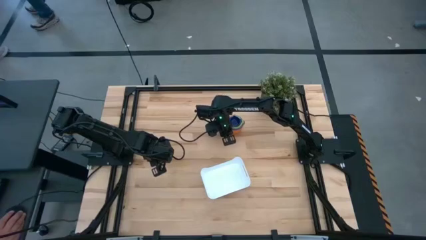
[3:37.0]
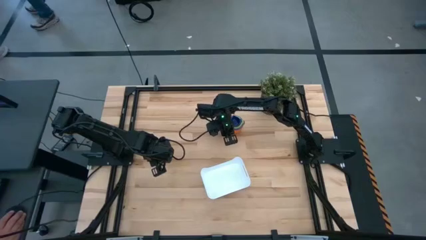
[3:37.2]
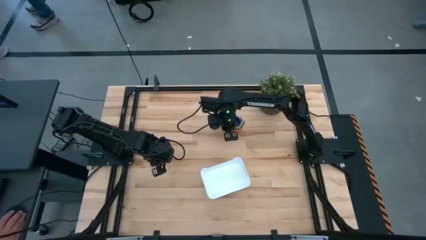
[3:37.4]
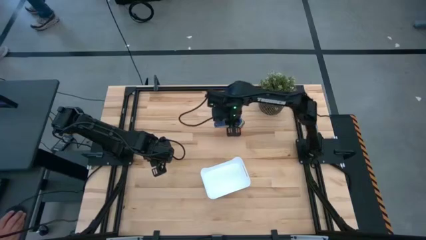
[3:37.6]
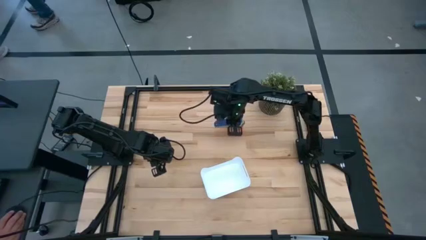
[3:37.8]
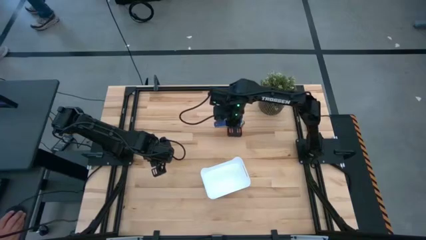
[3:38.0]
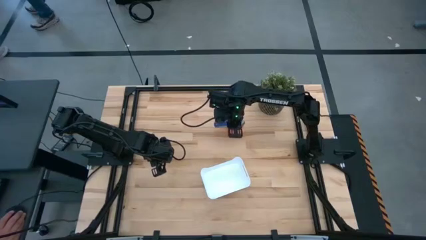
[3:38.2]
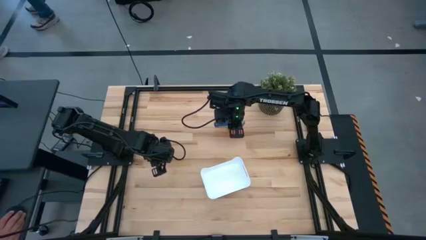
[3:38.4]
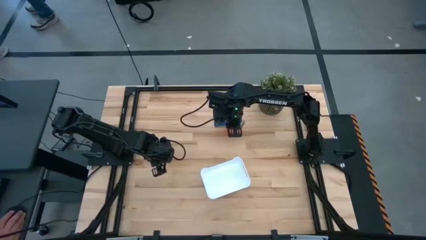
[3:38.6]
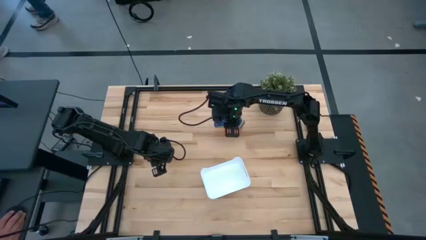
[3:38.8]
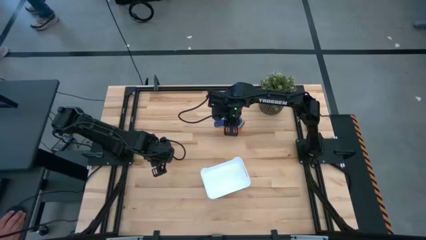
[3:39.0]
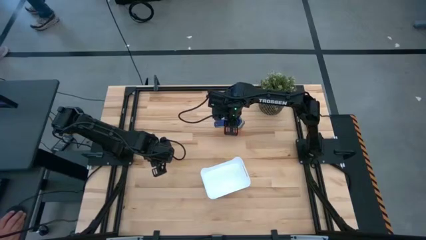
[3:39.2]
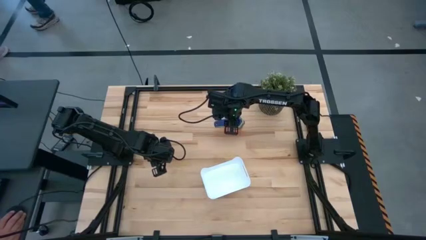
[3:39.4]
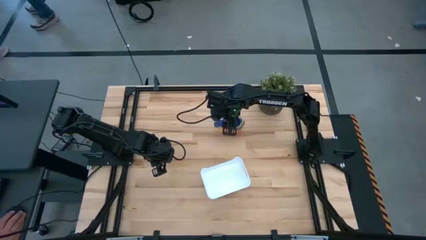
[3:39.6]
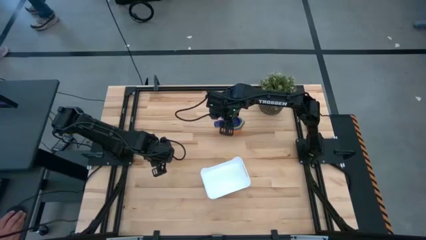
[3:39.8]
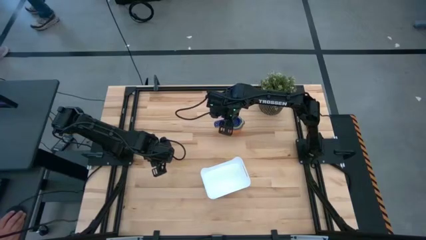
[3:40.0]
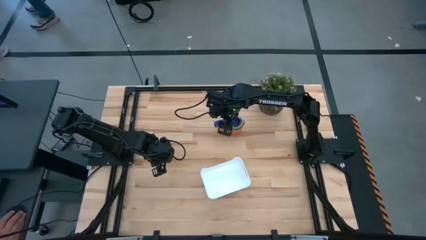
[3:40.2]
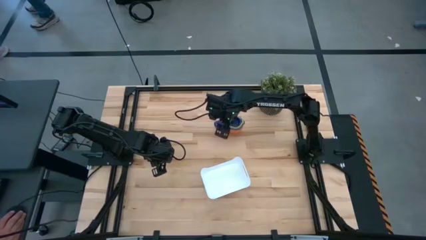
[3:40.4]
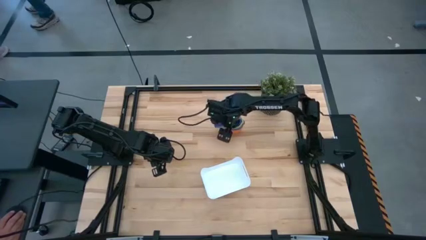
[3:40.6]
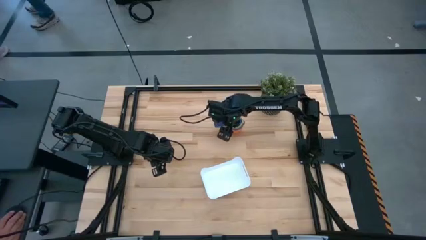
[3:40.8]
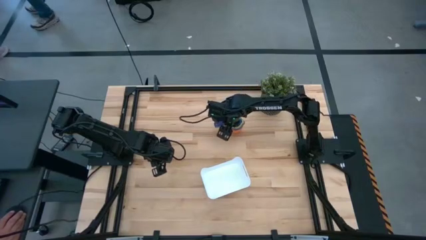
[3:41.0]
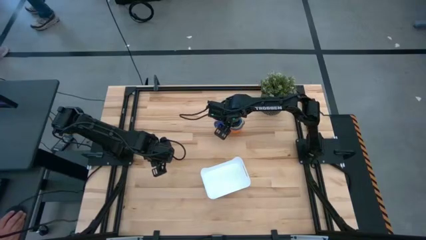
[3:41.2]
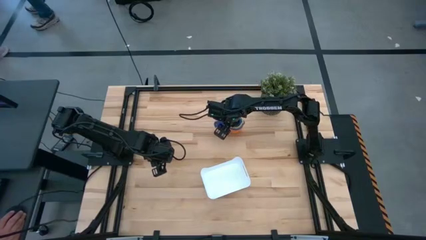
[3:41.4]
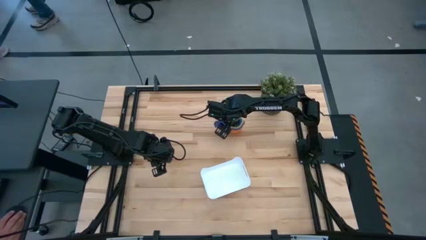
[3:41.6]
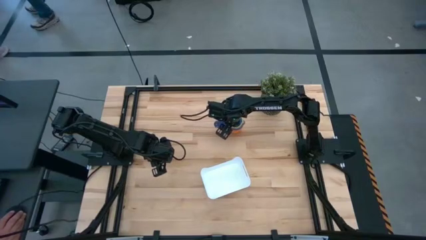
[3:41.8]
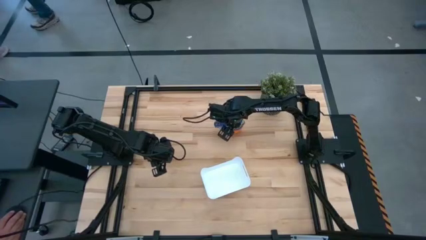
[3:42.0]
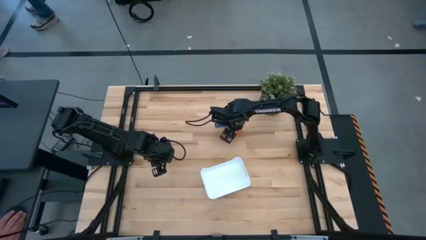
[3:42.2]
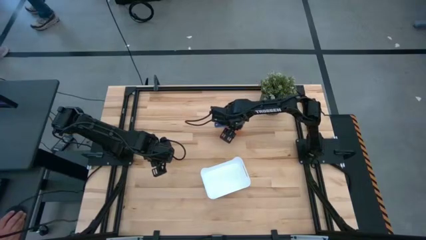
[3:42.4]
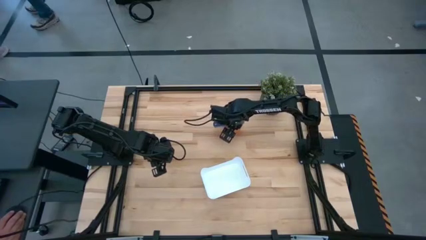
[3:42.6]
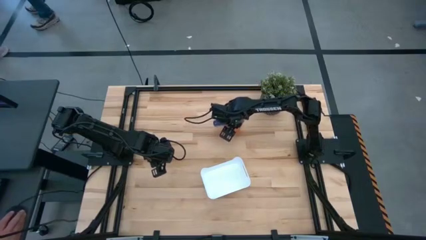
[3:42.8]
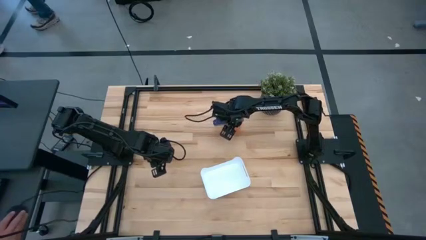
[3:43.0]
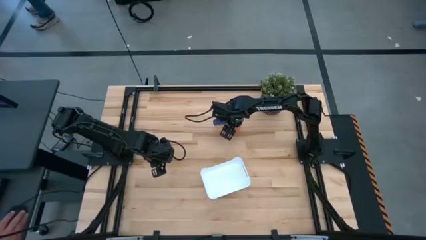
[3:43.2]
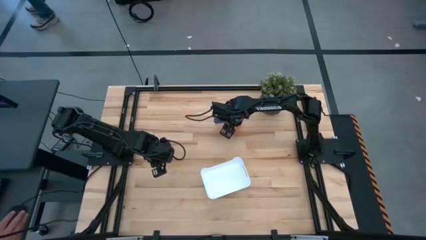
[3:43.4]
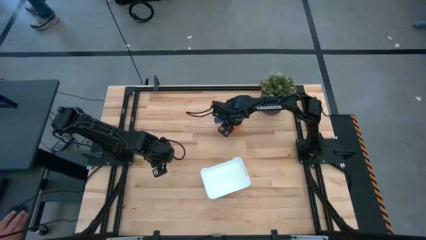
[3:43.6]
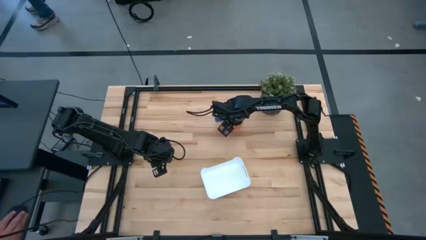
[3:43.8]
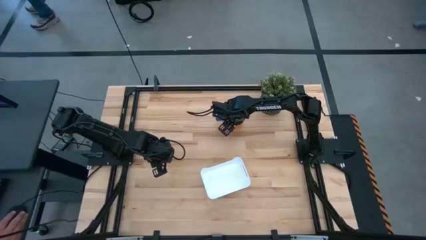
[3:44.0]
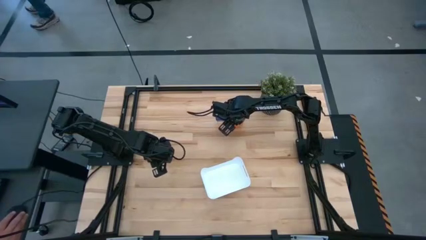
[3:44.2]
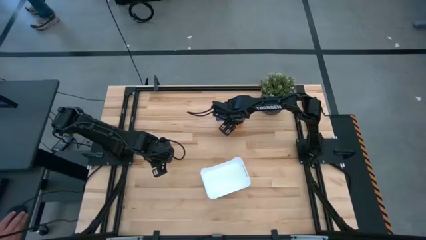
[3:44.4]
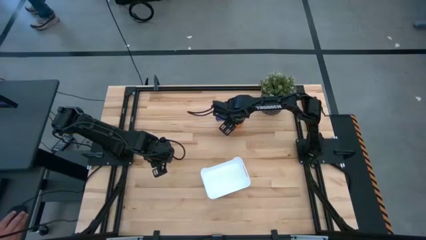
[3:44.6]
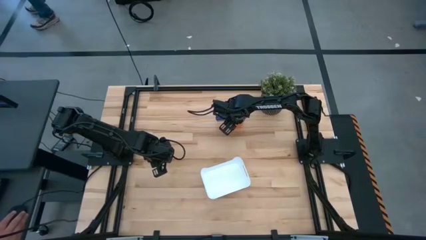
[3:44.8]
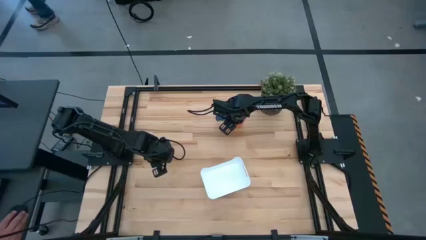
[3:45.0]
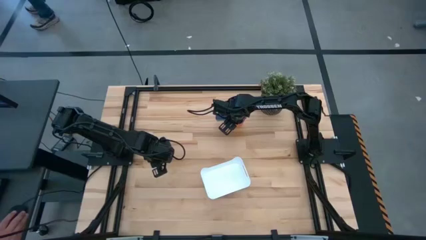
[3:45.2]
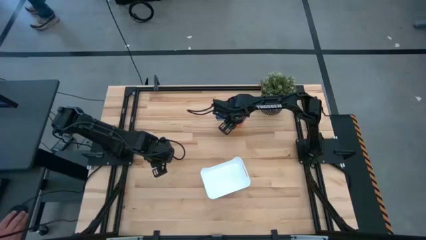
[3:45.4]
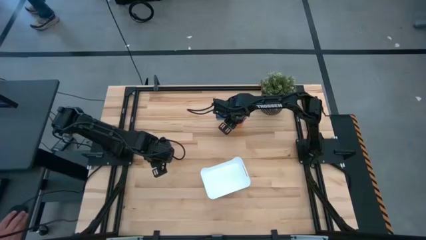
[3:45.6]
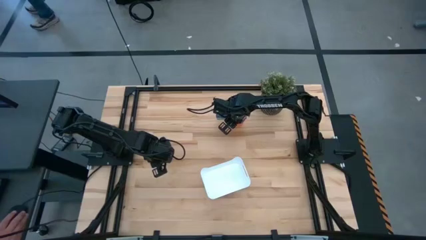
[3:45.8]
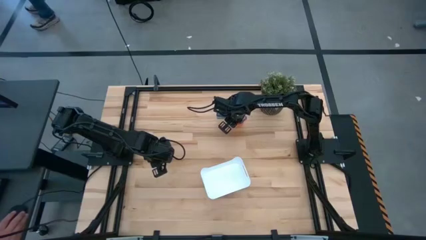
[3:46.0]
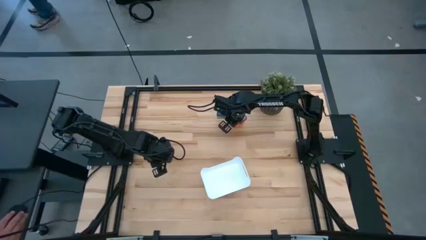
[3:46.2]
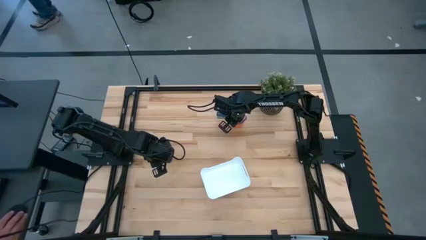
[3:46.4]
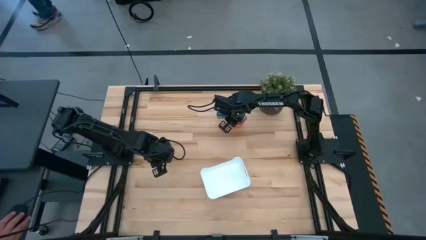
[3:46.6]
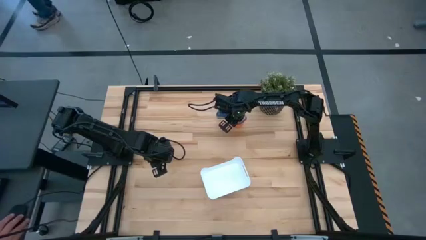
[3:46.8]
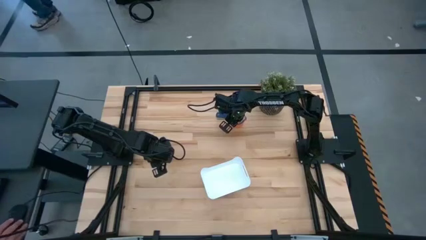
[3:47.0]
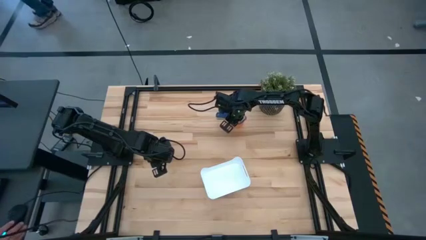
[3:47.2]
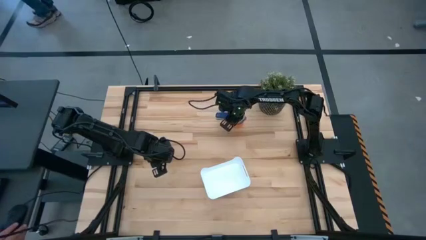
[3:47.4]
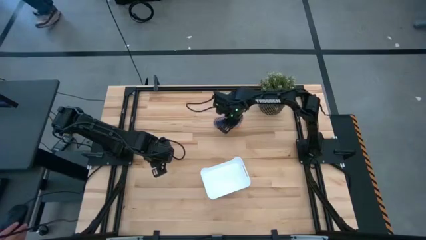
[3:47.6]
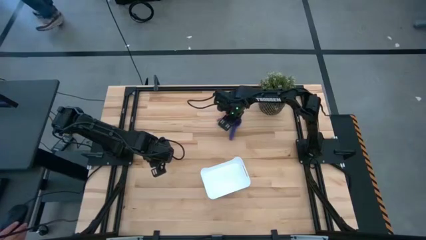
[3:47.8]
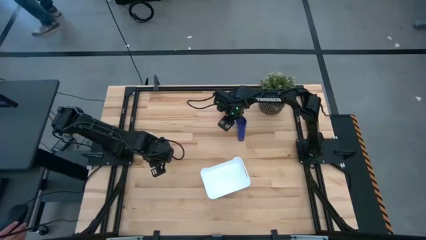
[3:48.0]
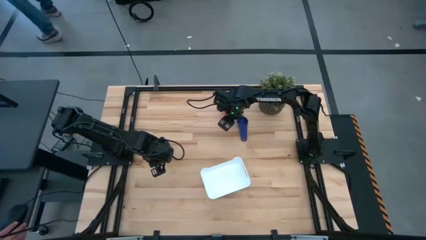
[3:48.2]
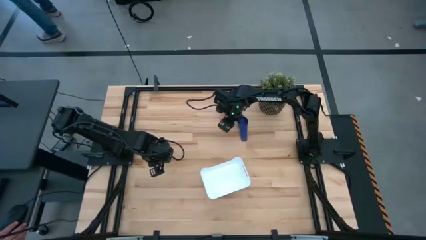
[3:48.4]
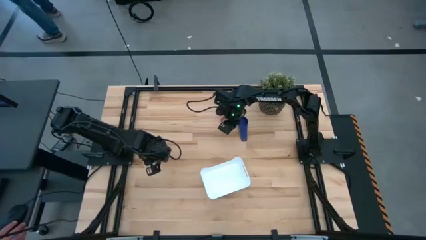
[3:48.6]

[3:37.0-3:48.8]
Task: Nest measuring cups in basket
Put the nested measuring cups into the white bin

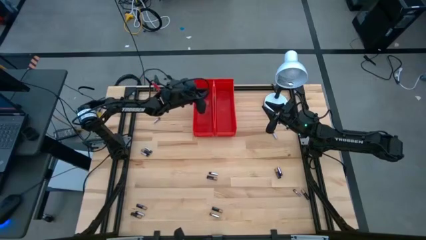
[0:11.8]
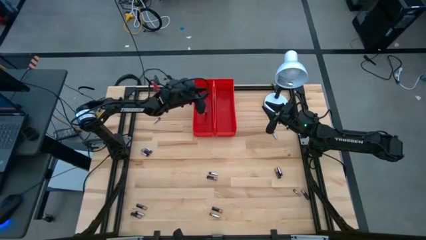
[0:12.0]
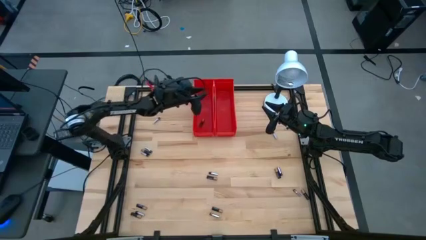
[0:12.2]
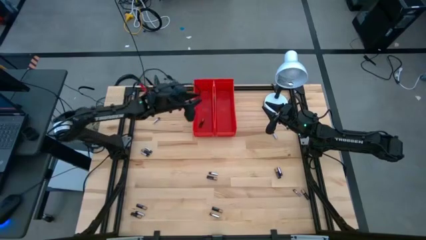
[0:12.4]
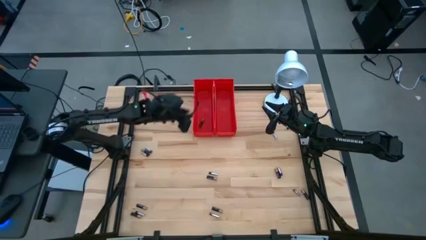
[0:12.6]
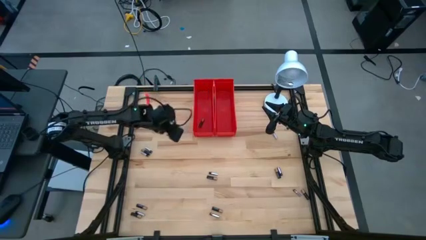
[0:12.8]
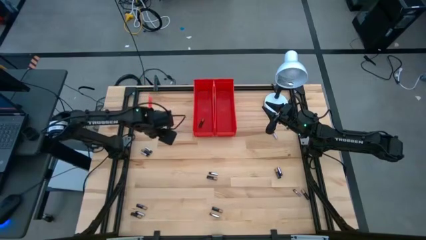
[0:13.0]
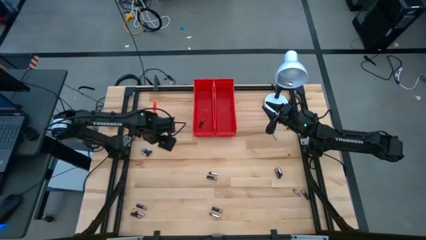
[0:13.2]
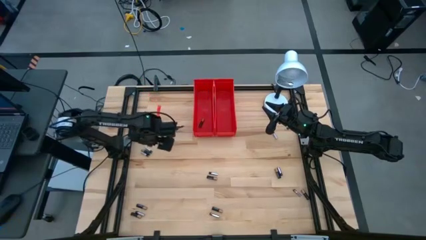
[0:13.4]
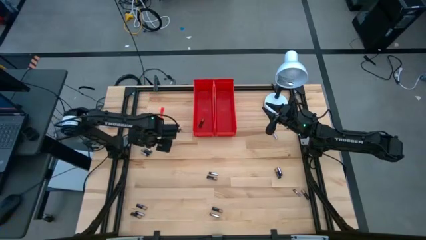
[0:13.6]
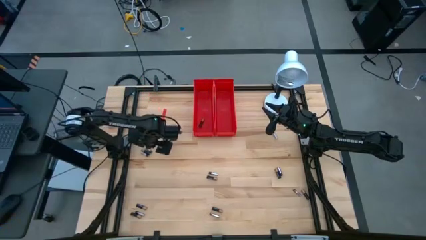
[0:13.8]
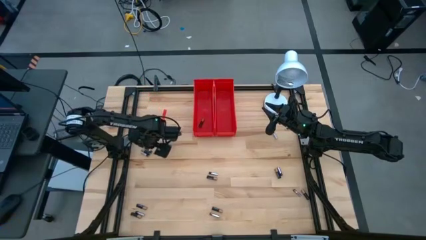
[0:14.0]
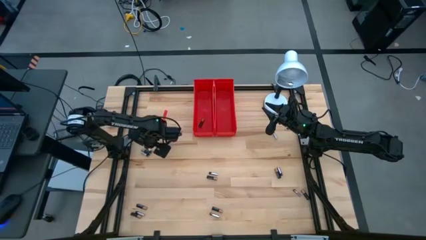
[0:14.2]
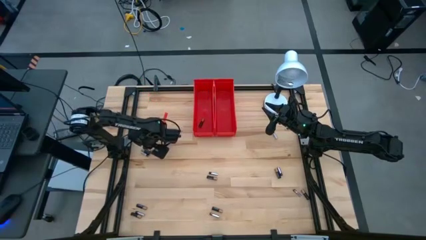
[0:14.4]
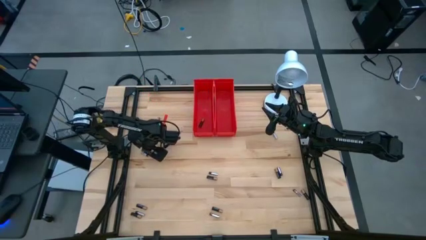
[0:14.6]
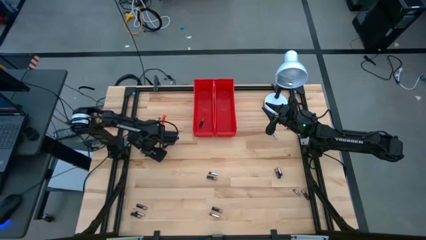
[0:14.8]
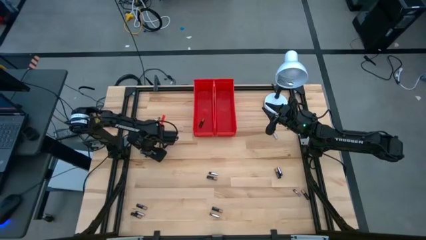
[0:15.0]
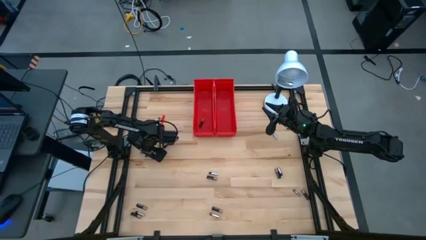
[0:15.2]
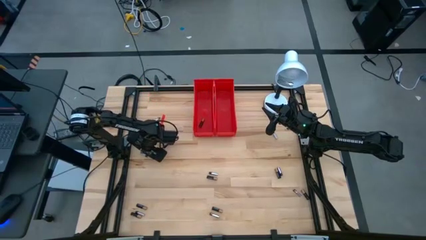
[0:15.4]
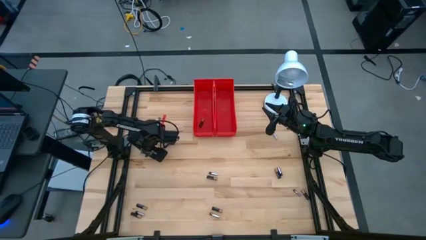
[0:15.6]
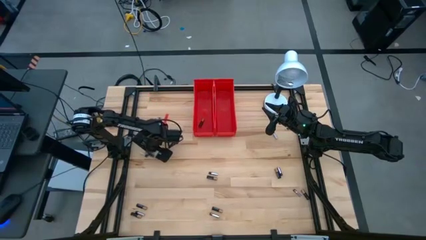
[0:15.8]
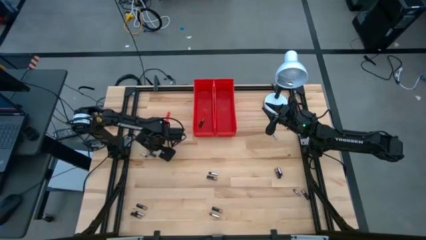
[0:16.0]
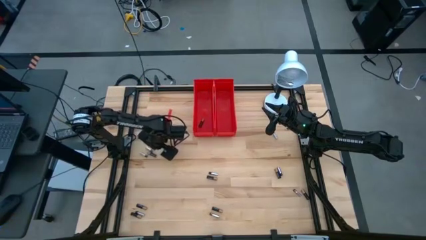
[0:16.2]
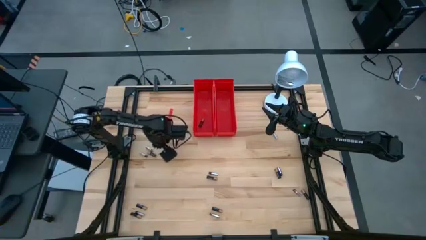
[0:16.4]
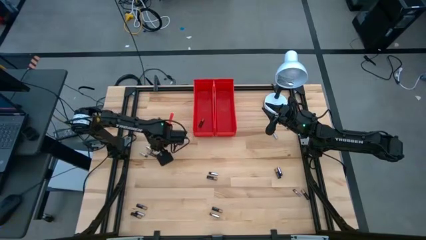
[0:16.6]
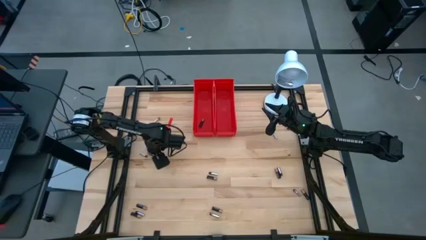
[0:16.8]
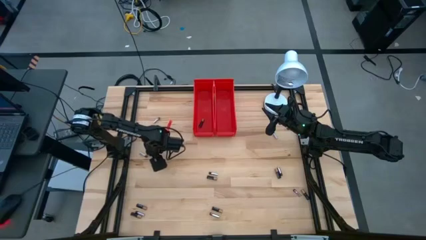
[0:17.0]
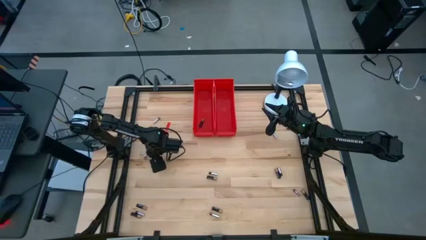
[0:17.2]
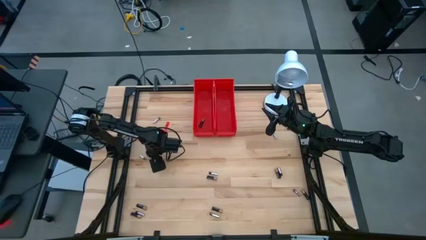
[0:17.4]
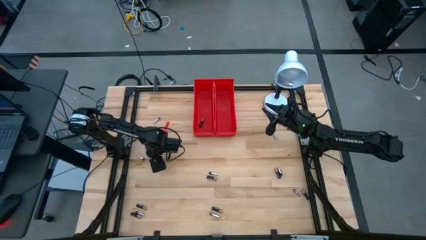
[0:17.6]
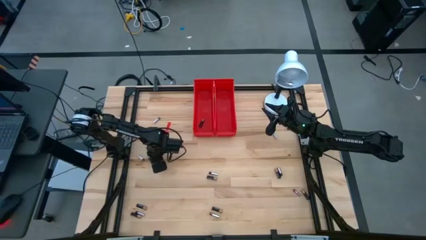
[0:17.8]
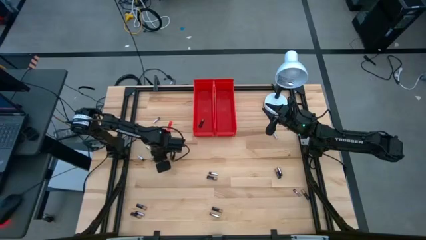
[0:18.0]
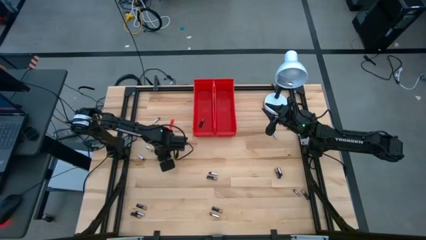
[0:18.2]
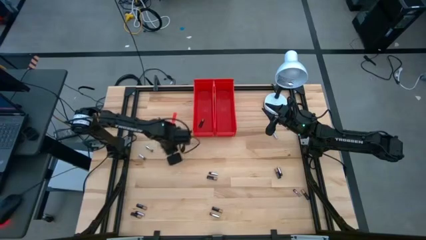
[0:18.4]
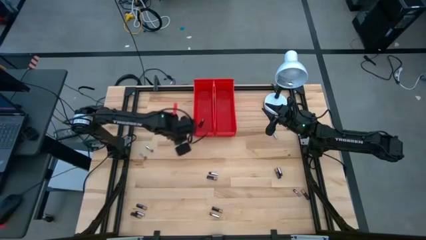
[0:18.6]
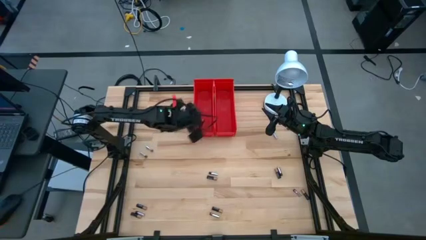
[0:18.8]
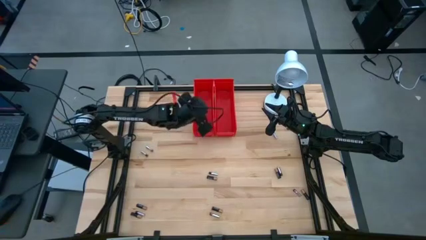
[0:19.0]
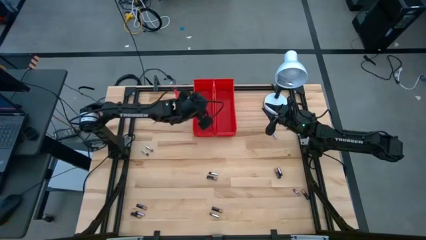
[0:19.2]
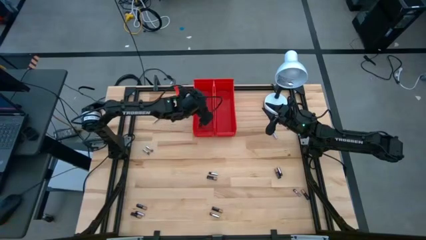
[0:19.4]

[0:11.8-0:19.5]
Task: Sort batteries
Put the black battery into the left red bin
